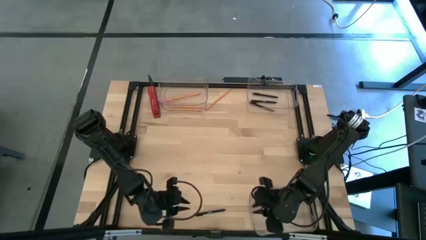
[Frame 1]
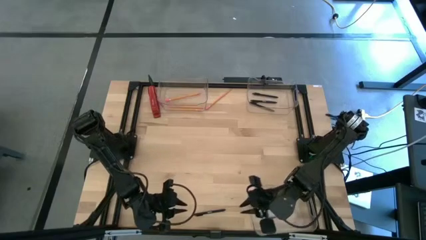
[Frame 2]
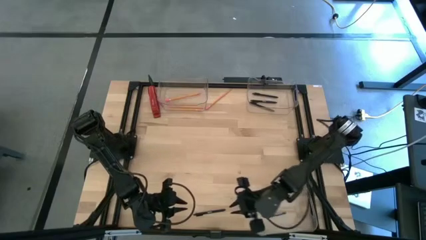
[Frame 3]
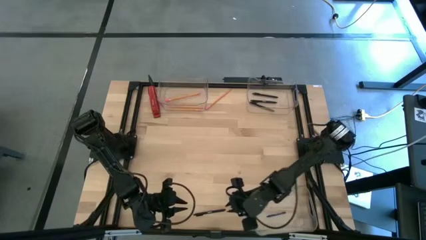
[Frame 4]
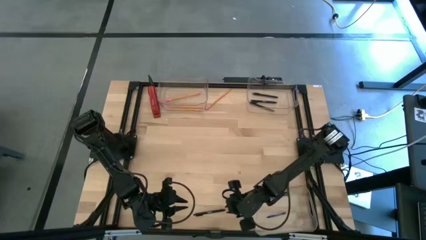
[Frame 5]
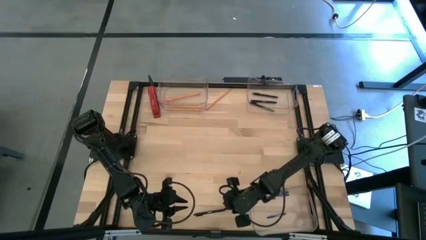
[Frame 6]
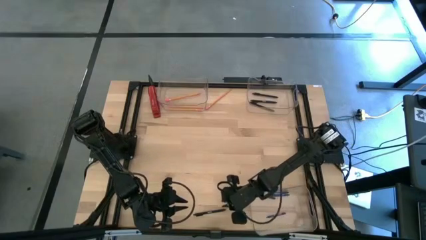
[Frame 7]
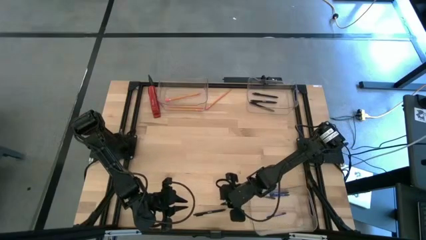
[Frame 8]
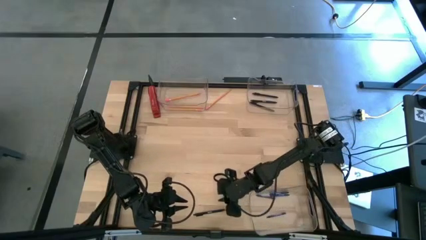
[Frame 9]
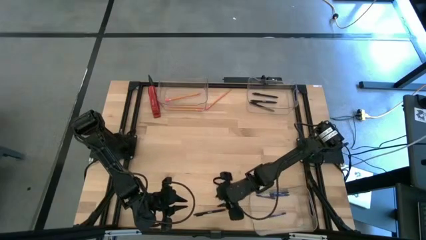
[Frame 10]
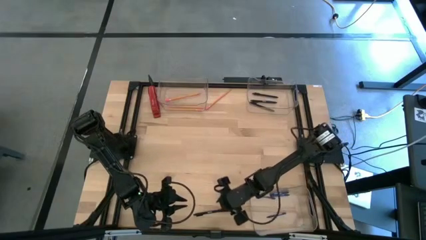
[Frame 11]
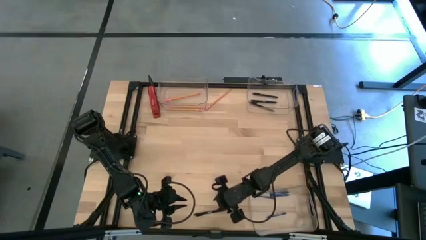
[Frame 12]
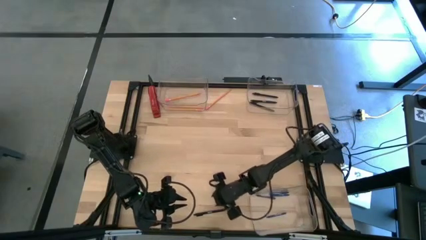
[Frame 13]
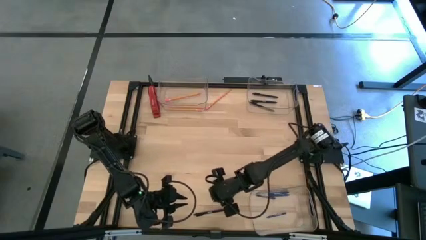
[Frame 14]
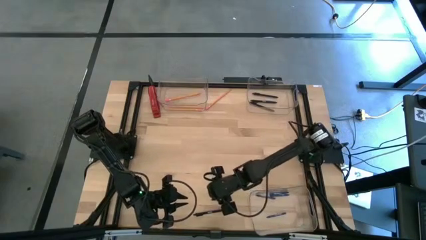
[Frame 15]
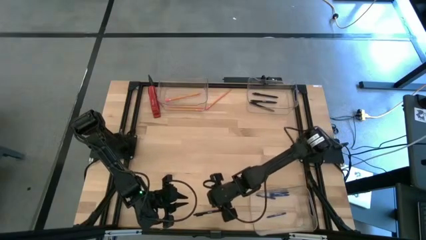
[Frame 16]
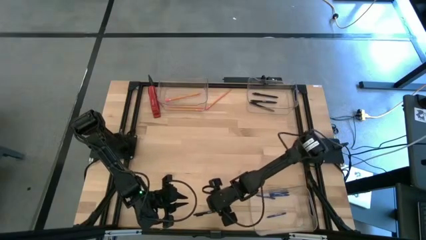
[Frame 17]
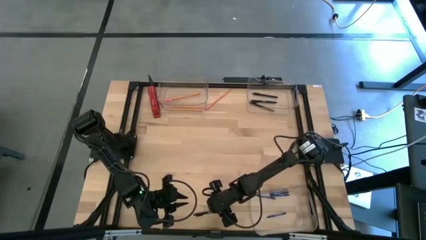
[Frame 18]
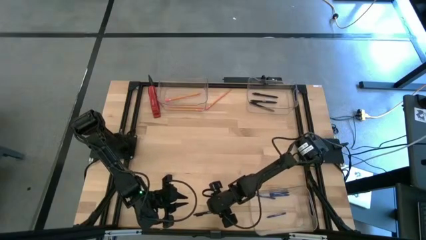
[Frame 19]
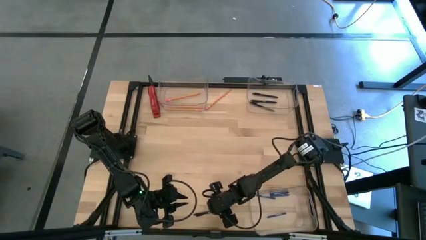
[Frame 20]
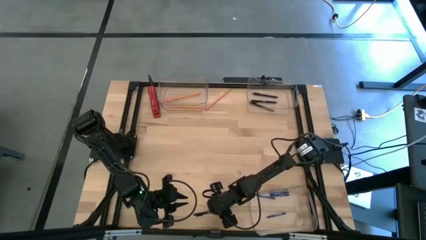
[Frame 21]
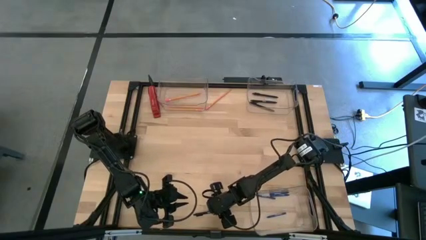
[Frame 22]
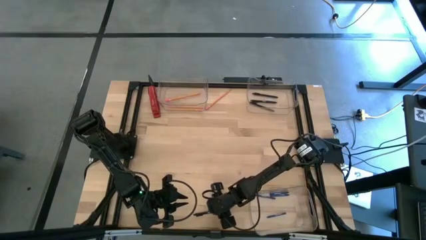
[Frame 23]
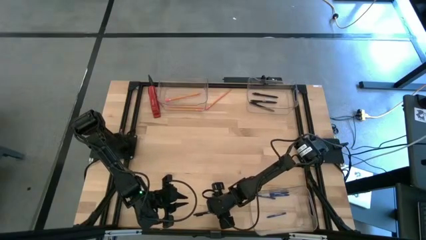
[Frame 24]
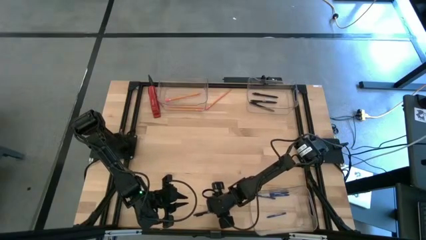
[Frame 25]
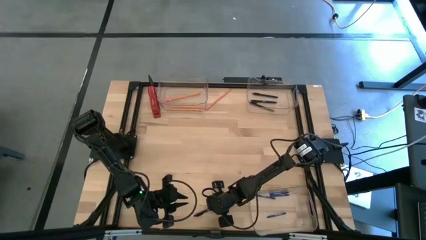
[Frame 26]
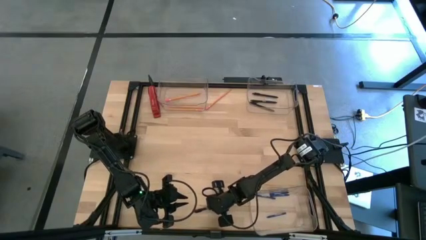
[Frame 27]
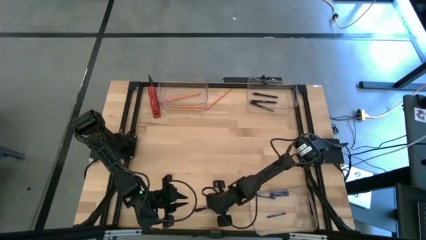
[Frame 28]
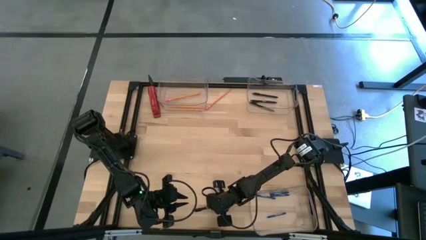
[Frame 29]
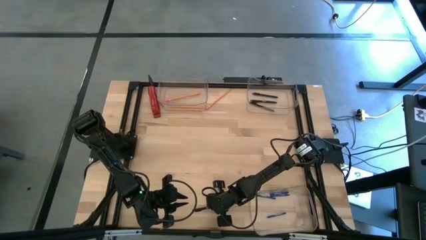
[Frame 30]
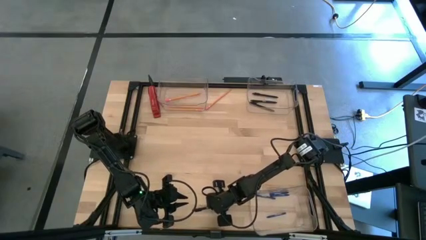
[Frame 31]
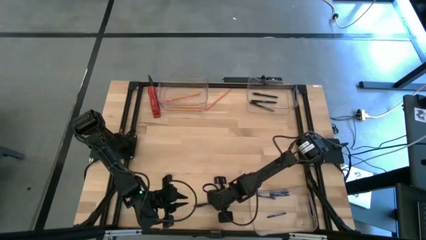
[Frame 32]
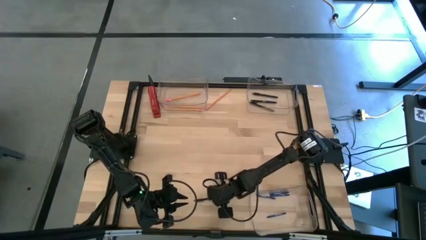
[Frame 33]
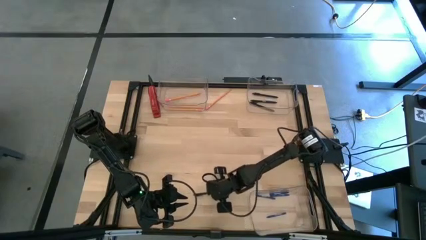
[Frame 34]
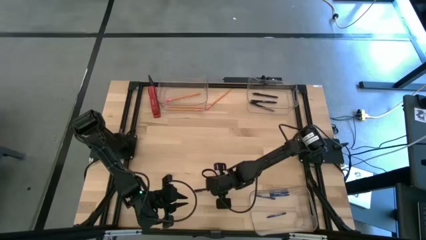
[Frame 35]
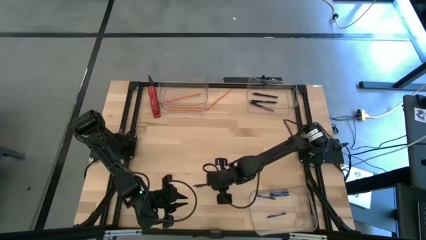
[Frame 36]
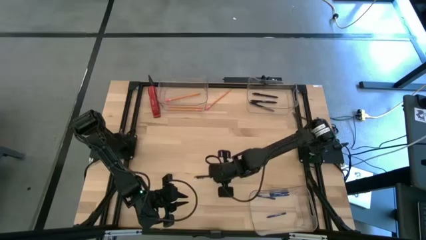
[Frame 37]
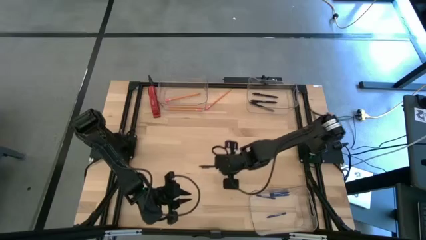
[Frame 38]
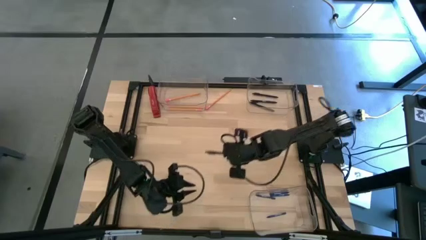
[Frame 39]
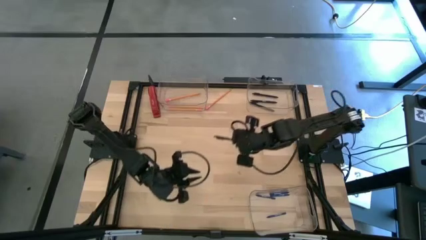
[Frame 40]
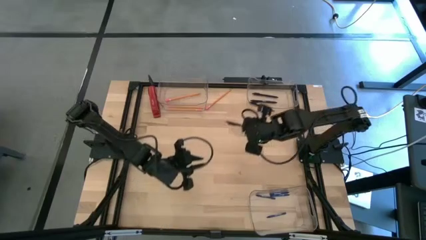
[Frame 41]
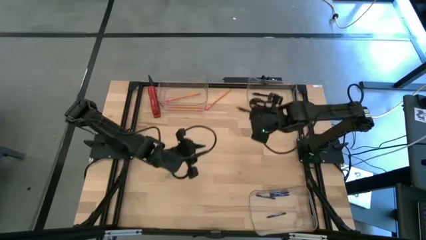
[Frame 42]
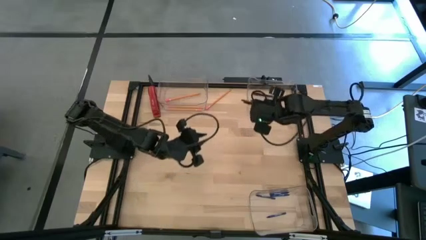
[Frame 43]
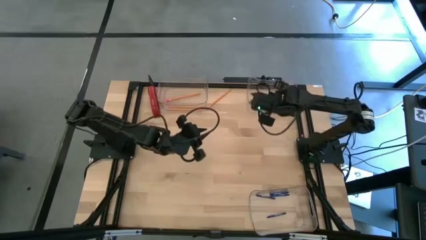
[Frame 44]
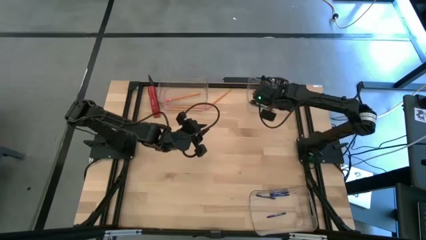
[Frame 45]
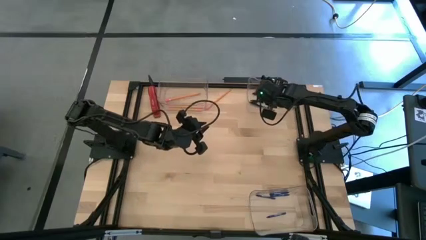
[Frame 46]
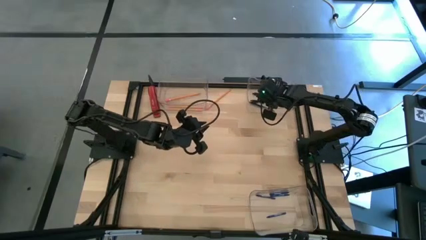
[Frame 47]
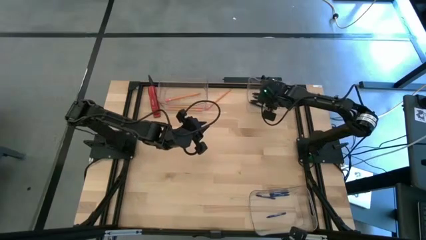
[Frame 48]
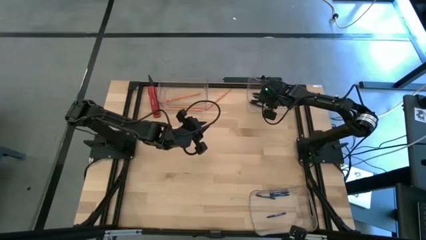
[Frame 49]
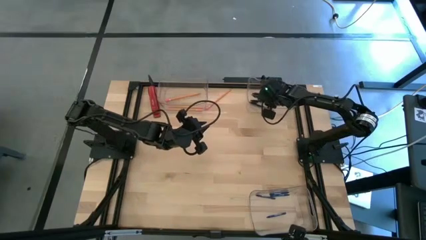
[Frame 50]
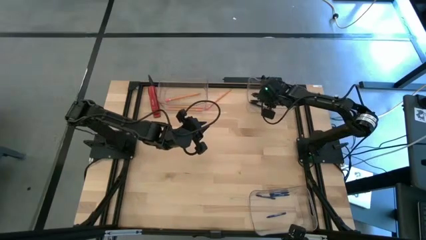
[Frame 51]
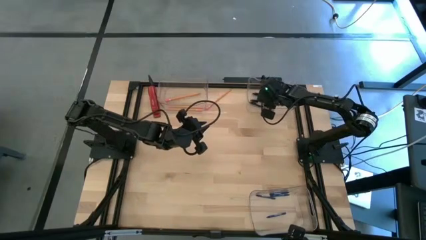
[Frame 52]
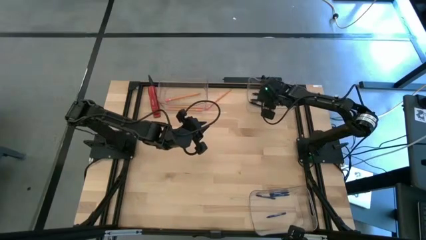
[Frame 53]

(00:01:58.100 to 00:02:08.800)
Task: Sort crayons/erasers/pens/pencils in bins
Put the black pen into the top right transparent bin

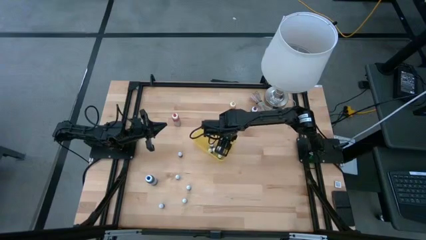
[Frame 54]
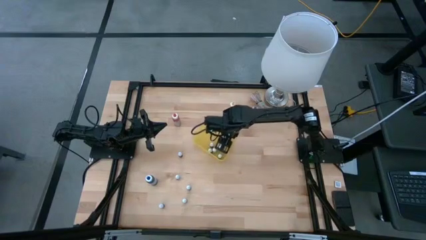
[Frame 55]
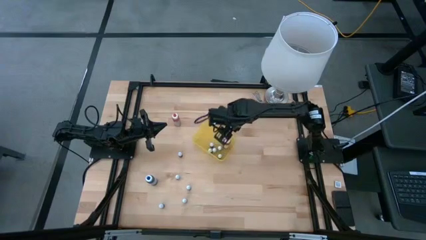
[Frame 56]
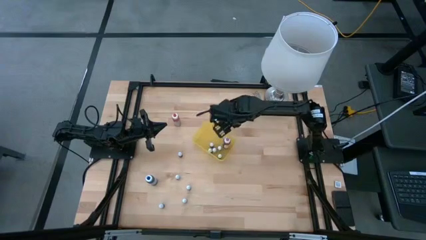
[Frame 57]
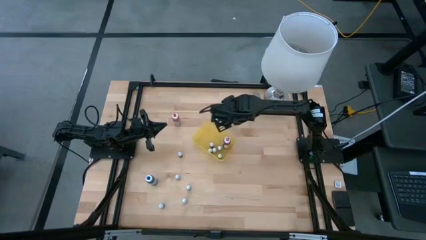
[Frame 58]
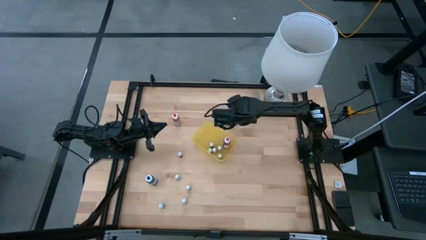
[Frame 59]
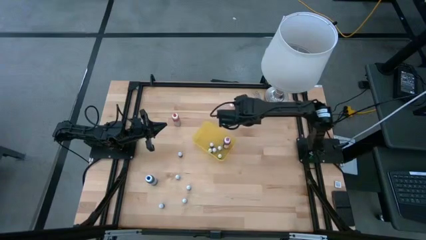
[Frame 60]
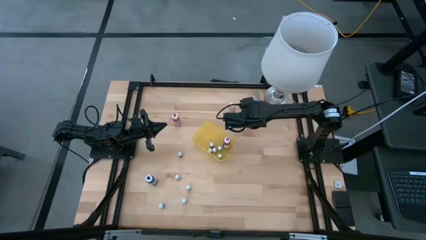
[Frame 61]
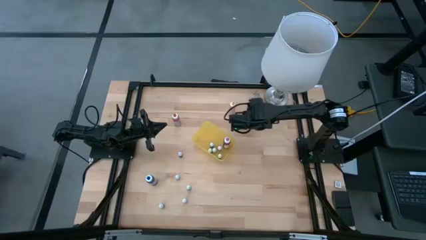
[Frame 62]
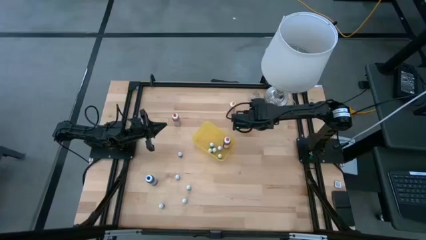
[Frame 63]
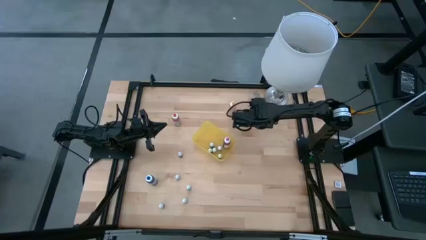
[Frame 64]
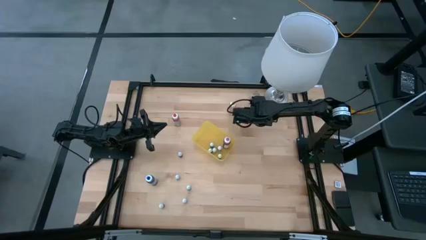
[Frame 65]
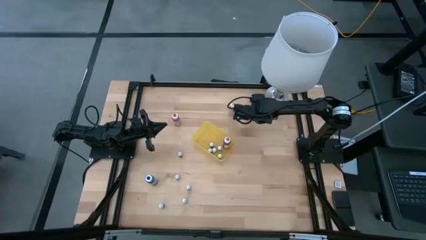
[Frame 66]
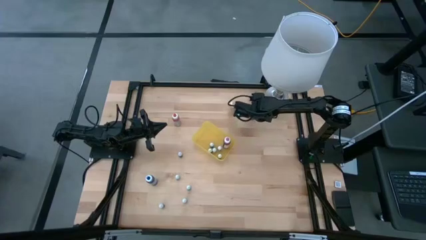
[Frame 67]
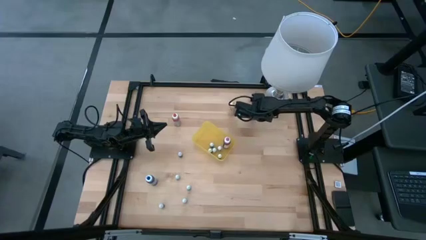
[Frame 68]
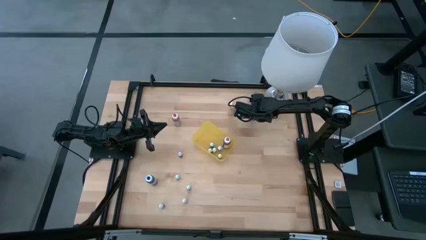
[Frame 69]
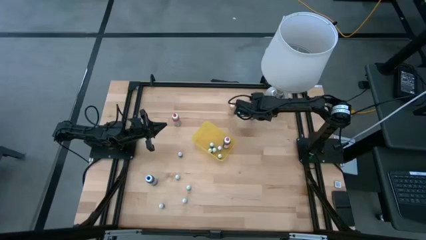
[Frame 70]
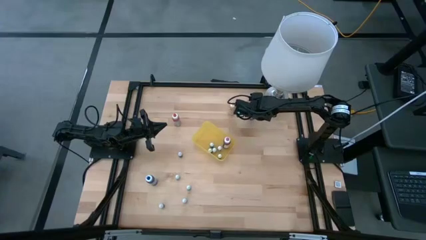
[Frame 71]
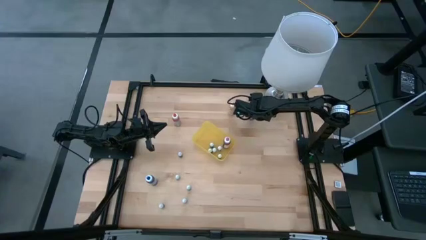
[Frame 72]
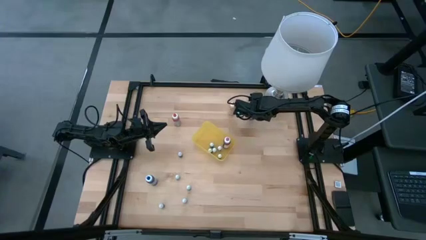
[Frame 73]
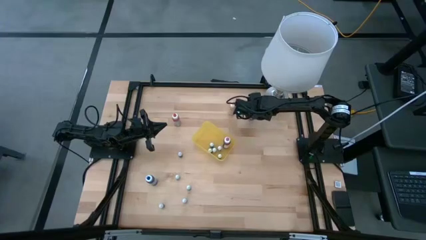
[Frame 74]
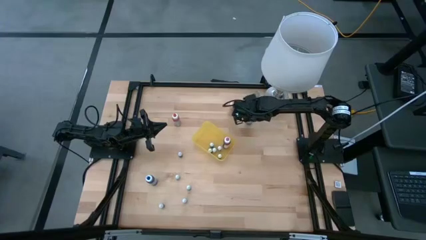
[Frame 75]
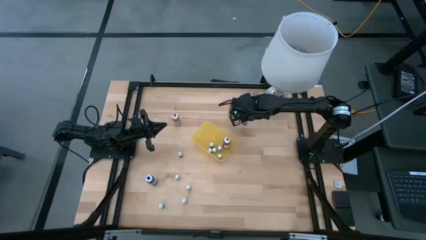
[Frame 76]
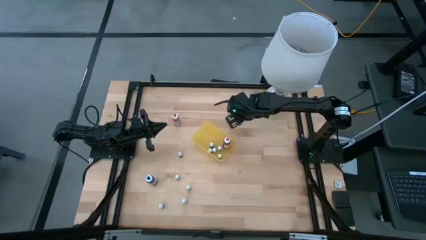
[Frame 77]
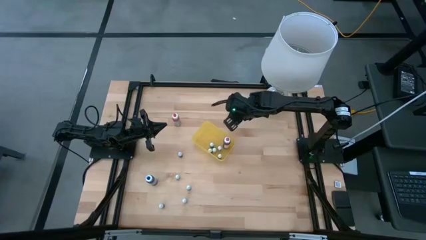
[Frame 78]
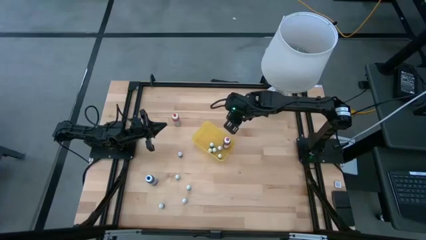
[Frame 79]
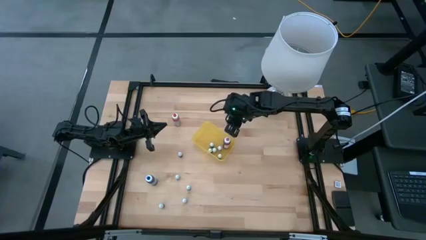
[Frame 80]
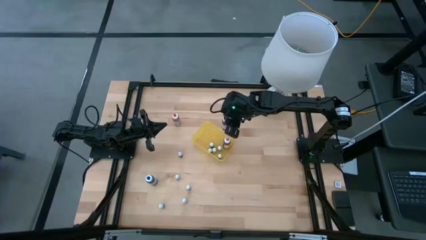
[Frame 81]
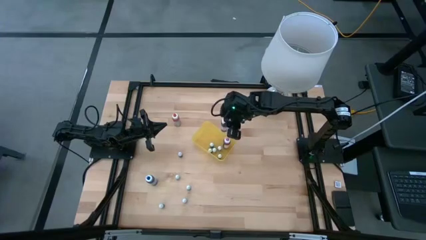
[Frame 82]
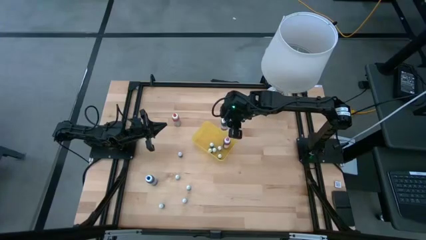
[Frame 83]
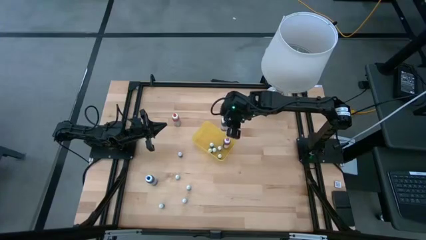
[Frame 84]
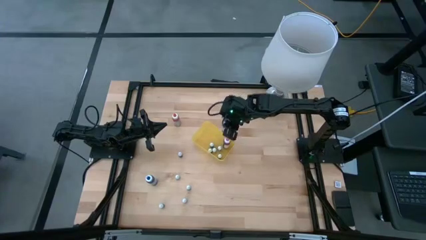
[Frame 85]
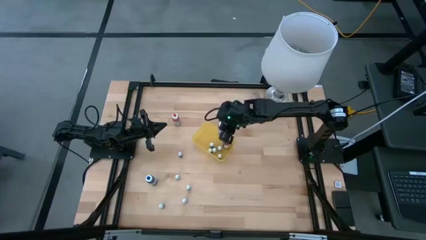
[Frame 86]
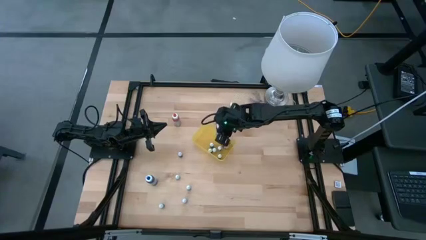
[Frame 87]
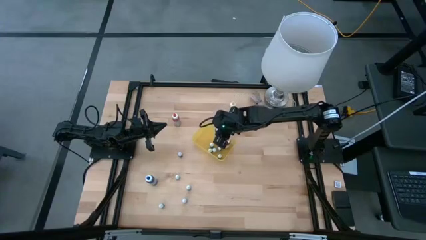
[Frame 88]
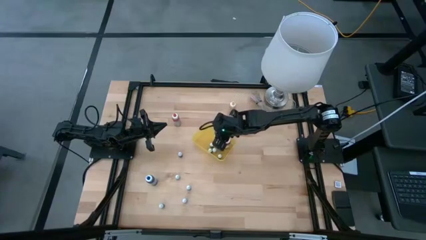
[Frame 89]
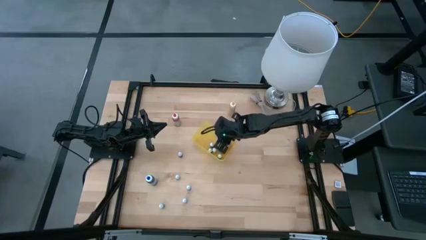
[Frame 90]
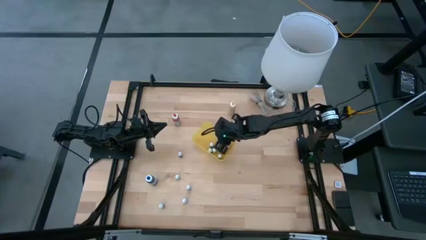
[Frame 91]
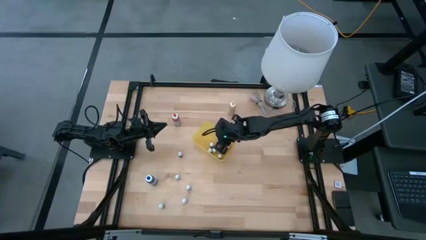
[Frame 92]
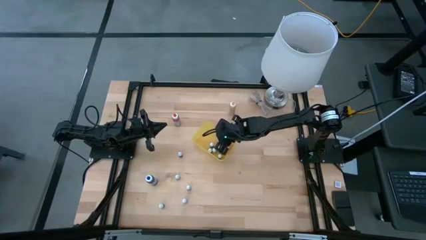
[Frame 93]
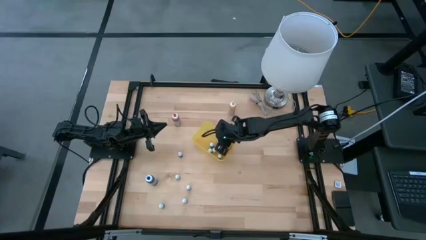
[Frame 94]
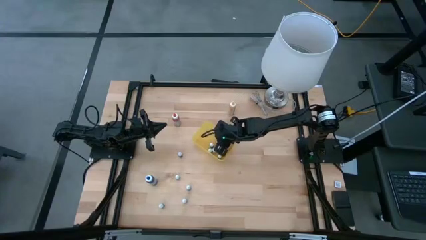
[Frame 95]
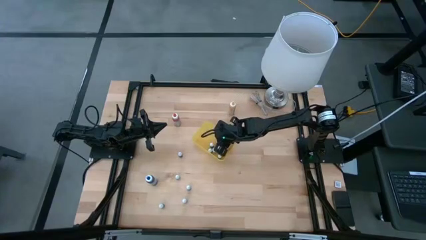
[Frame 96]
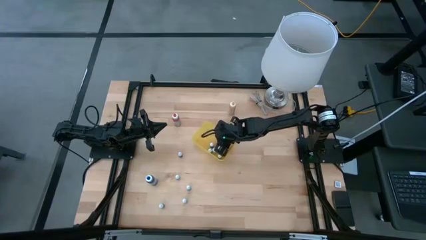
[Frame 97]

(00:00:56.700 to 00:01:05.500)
Task: Pick & Place food coloring
Put the large purple food coloring bottle into the yellow bin
